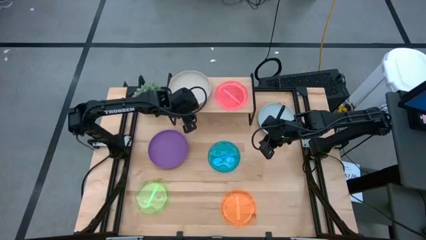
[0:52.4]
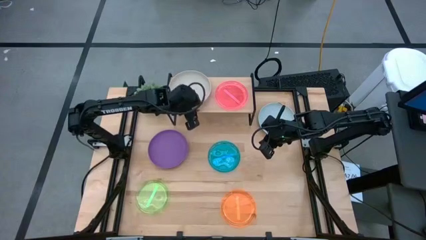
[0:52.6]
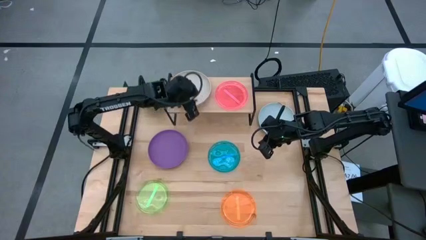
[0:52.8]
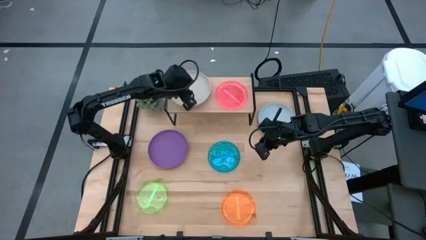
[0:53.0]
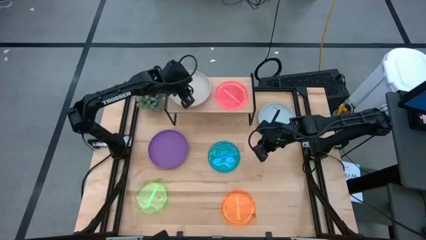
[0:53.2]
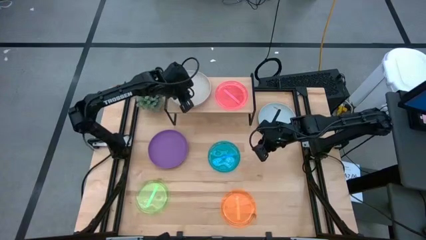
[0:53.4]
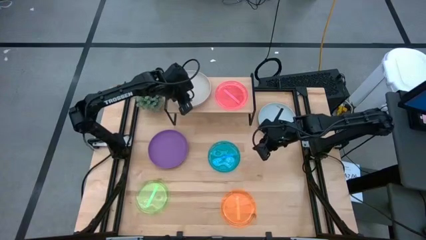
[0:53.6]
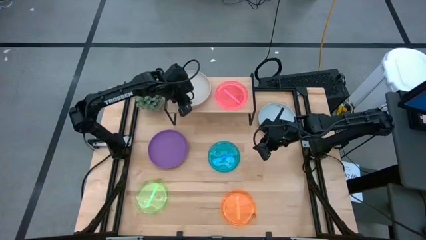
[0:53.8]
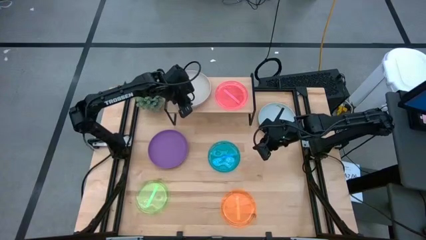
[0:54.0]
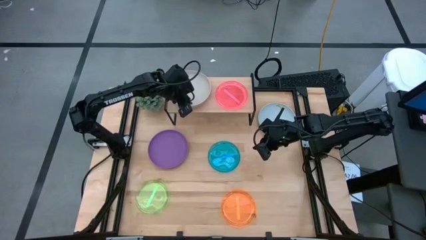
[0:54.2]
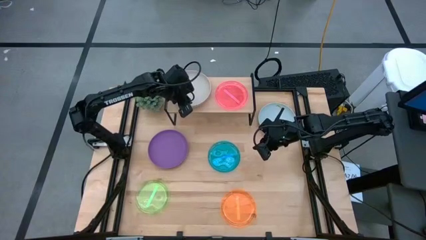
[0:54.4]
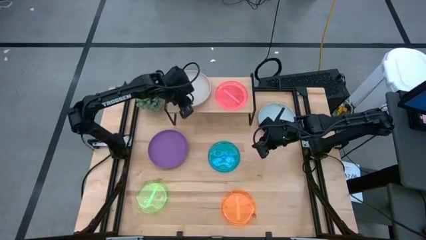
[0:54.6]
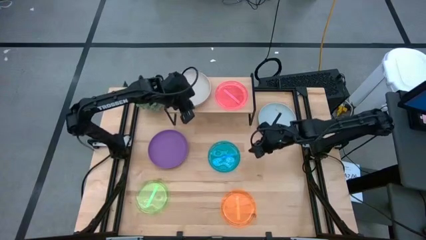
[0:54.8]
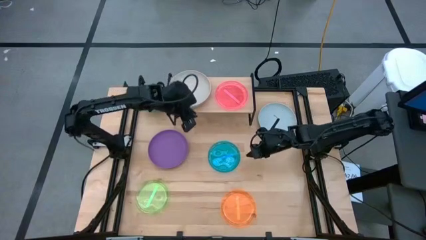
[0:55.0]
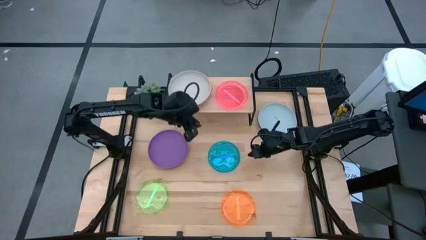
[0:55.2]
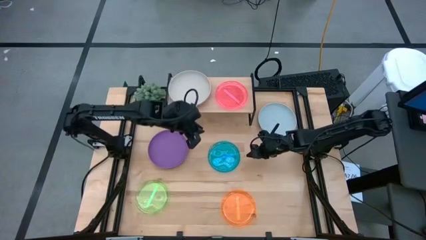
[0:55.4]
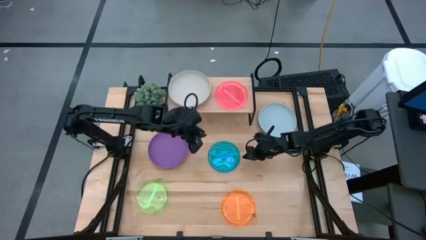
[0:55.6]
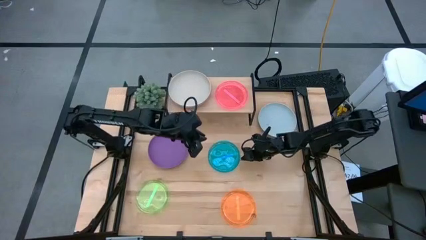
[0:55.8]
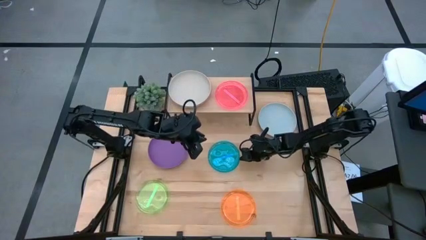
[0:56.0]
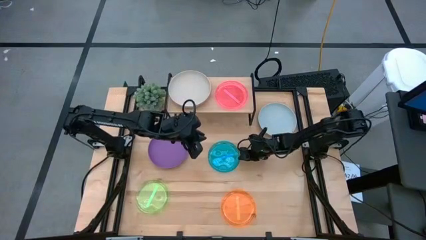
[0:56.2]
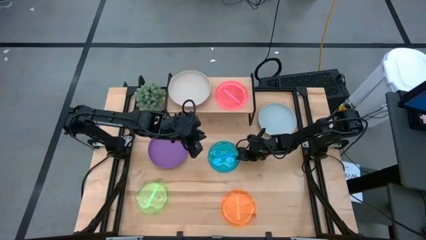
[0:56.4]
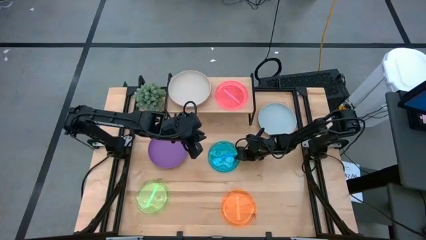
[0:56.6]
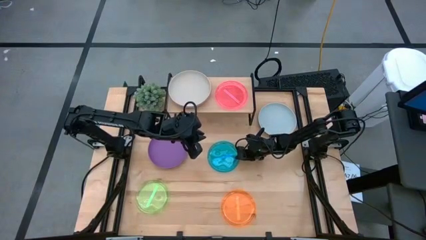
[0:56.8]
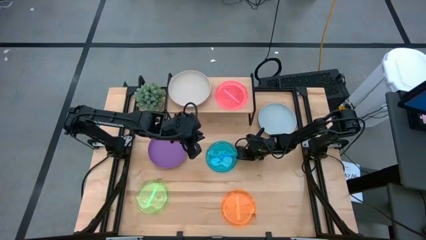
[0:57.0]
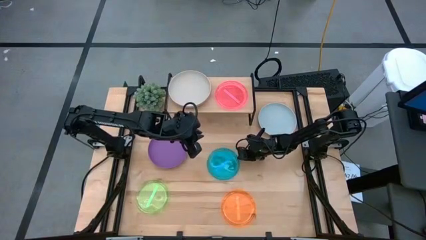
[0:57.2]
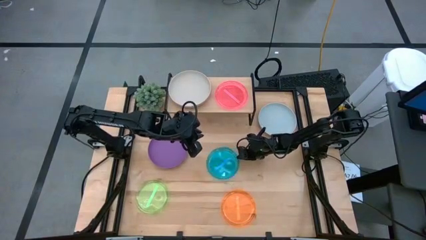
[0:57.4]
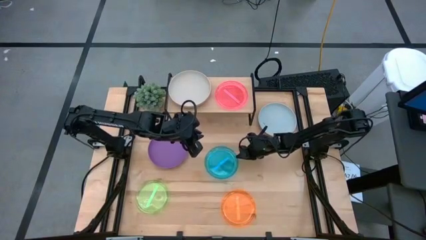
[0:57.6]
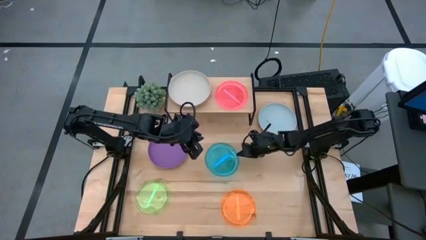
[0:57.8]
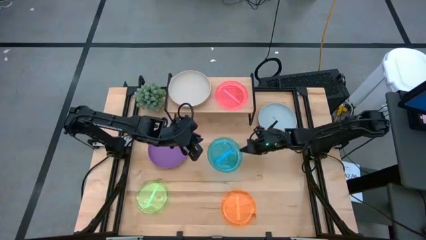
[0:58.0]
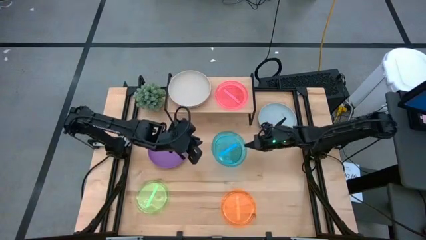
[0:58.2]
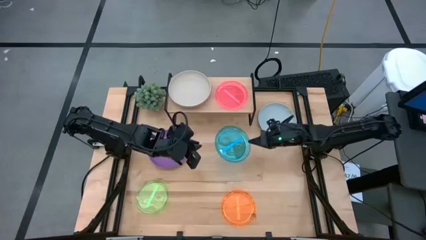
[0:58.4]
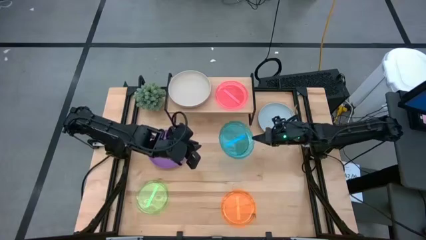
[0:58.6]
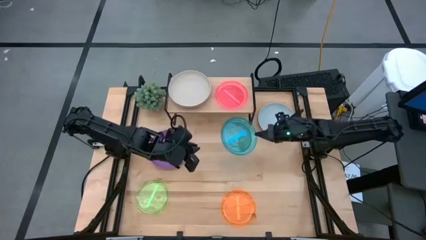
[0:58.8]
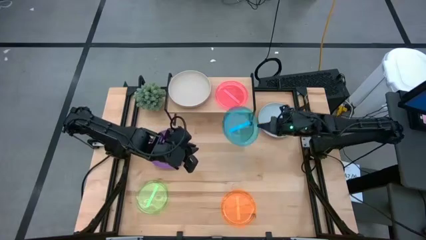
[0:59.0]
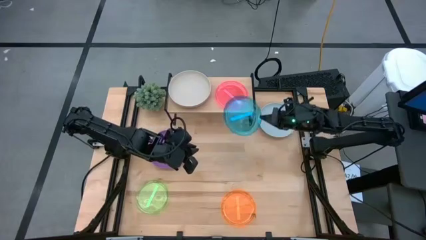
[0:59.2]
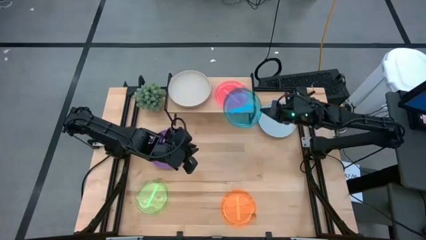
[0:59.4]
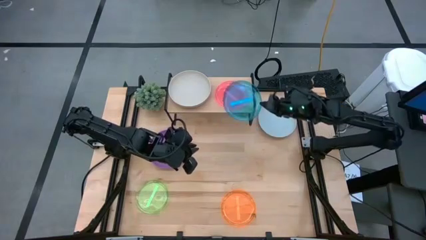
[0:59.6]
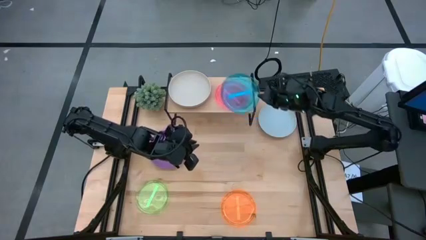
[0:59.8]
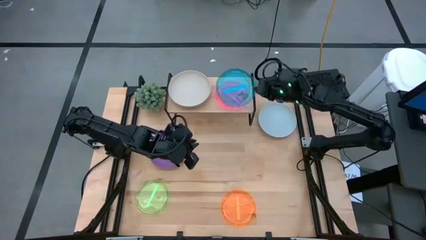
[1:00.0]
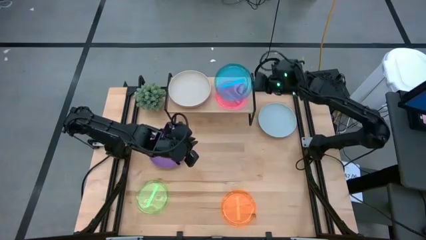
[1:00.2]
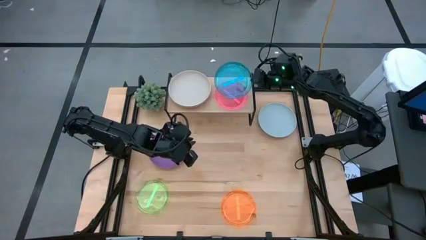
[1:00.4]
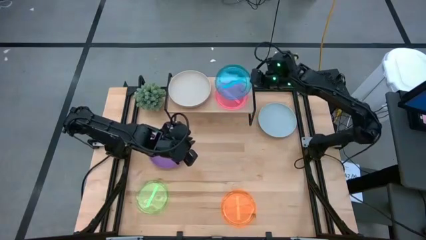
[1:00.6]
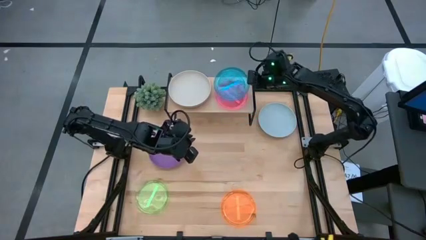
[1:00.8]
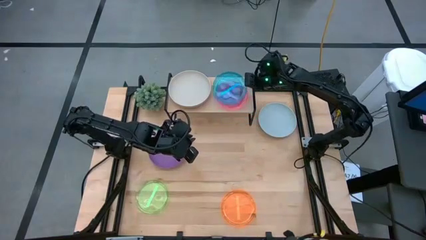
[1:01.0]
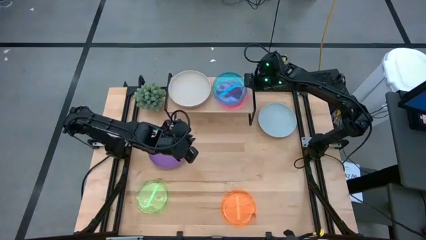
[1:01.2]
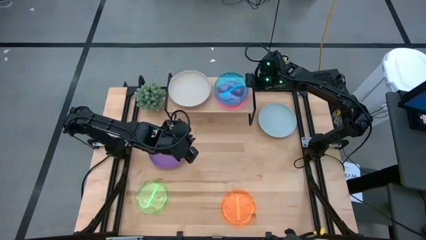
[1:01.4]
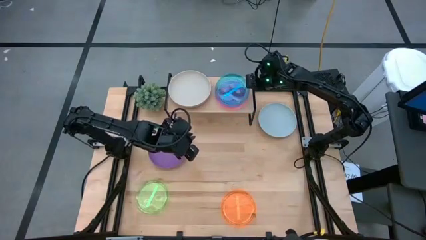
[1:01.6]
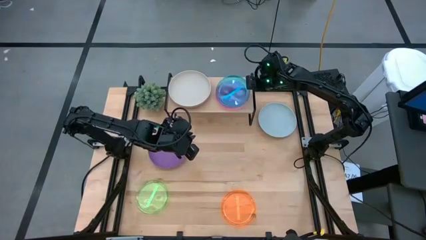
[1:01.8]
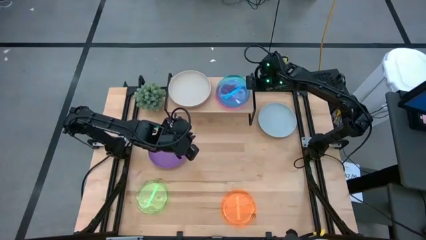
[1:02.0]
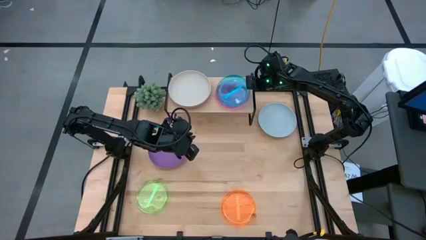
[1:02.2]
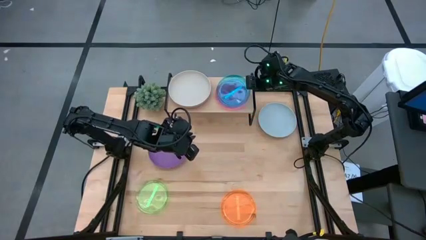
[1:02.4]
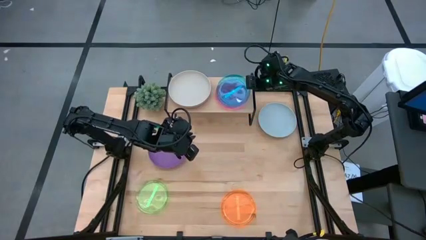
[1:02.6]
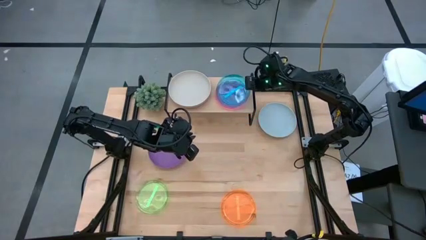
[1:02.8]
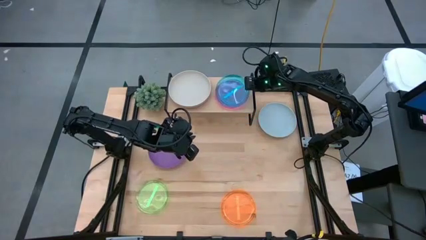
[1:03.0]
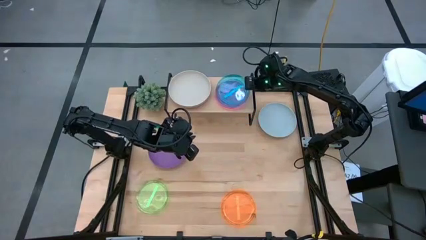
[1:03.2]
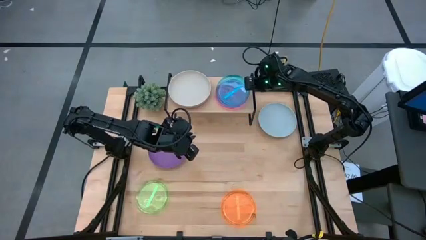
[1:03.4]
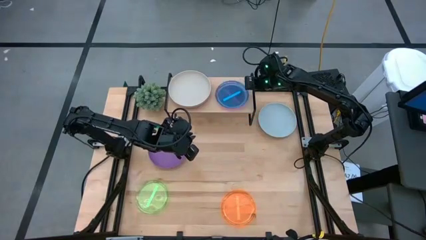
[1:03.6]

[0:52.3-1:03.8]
Task: Place and stack plates onto a shelf
Stack the small blue plate on top of the small pink plate on the shelf

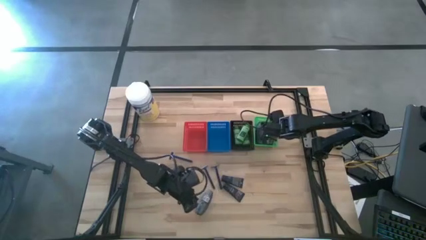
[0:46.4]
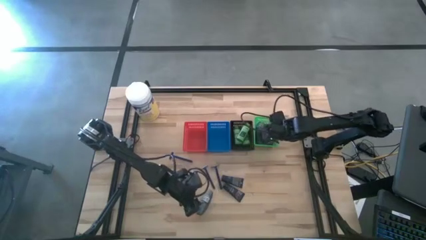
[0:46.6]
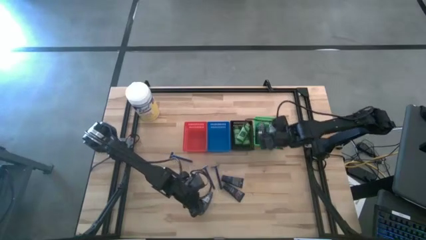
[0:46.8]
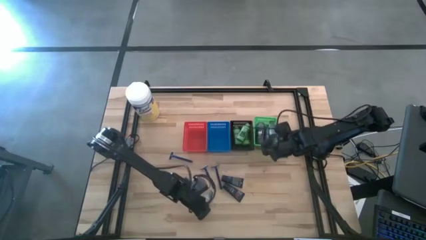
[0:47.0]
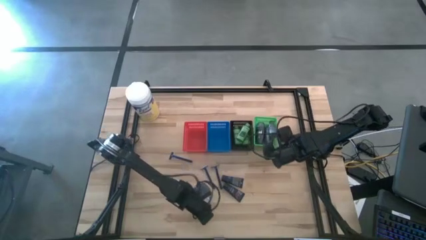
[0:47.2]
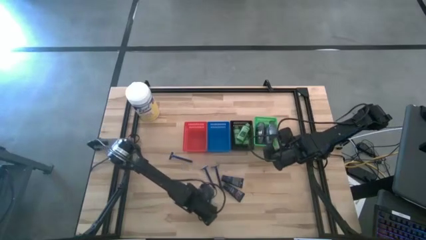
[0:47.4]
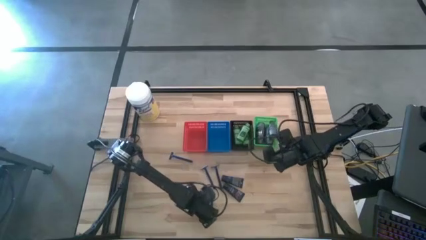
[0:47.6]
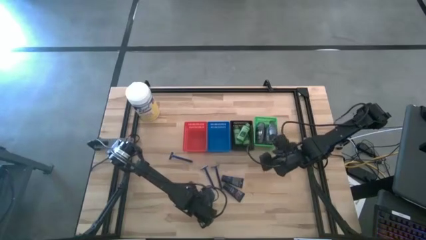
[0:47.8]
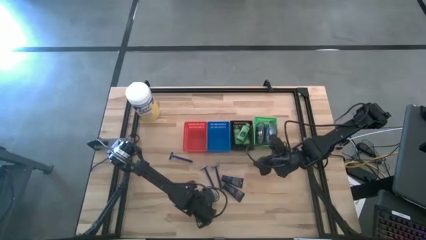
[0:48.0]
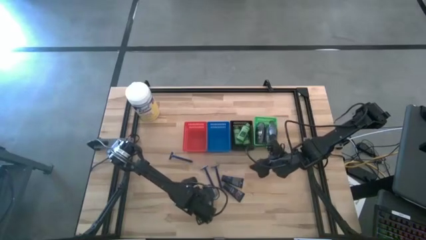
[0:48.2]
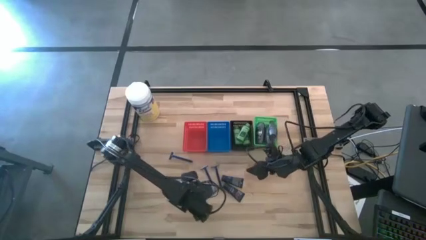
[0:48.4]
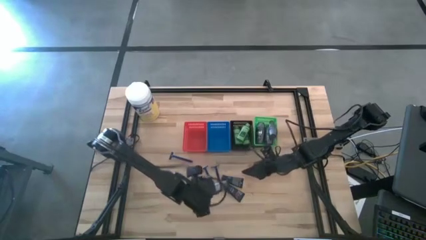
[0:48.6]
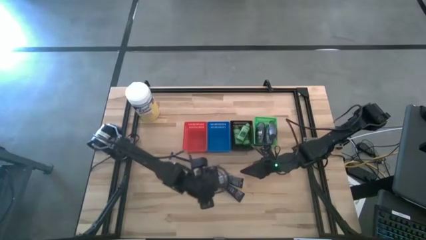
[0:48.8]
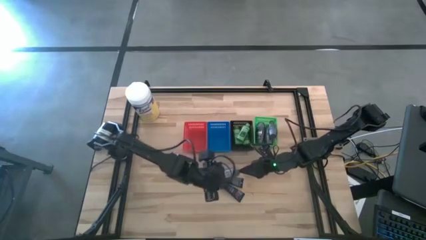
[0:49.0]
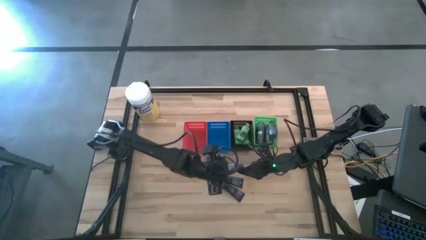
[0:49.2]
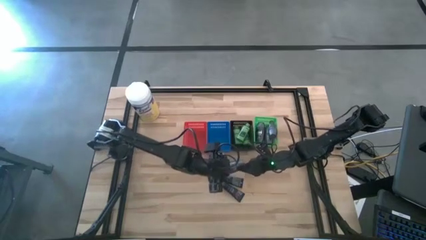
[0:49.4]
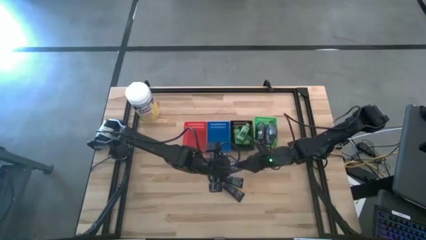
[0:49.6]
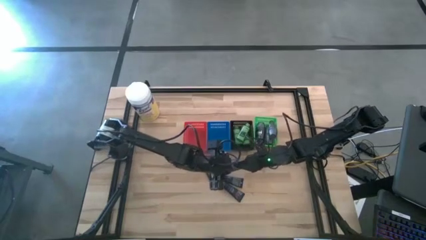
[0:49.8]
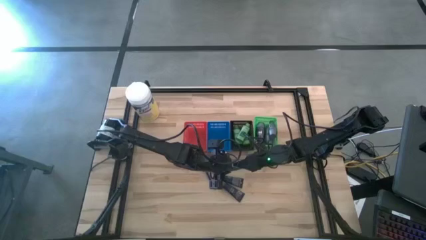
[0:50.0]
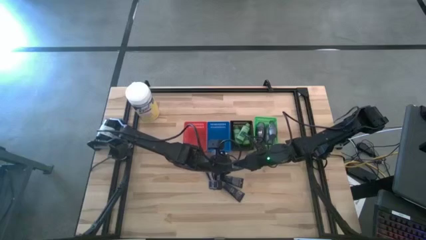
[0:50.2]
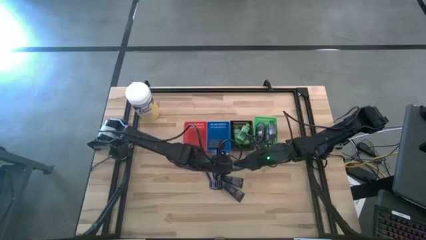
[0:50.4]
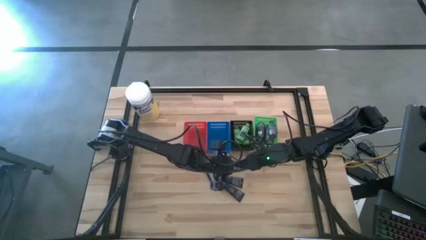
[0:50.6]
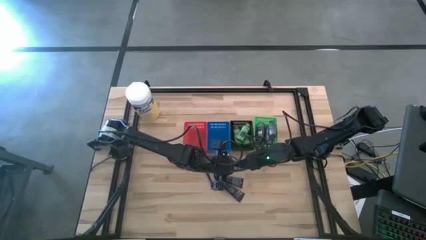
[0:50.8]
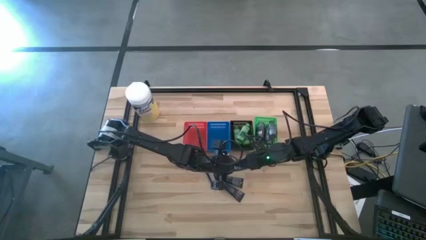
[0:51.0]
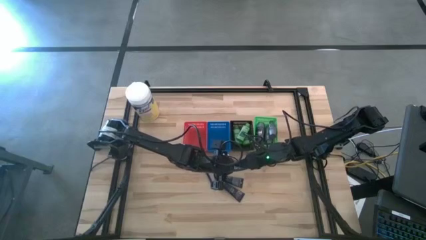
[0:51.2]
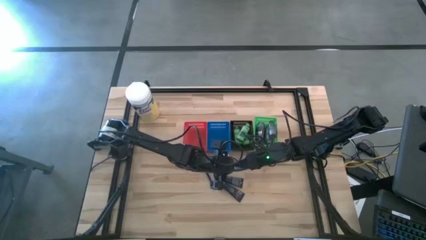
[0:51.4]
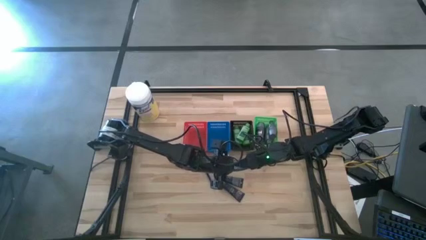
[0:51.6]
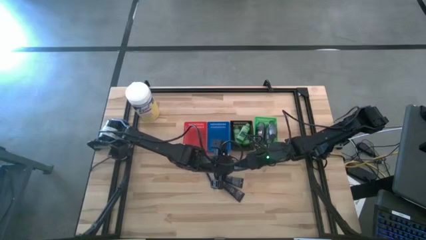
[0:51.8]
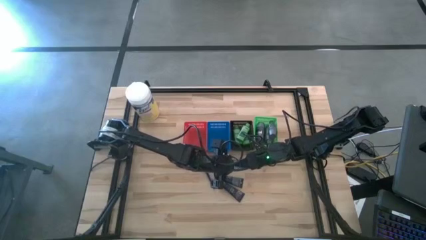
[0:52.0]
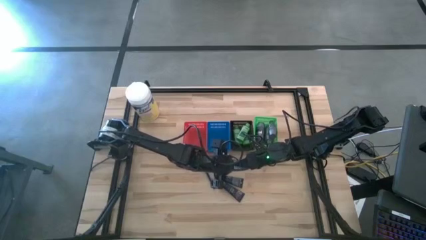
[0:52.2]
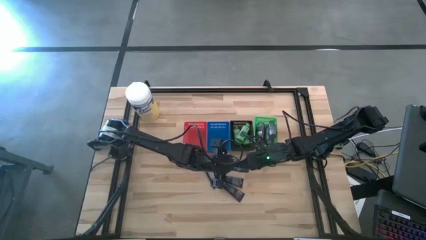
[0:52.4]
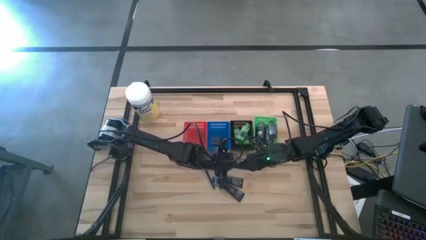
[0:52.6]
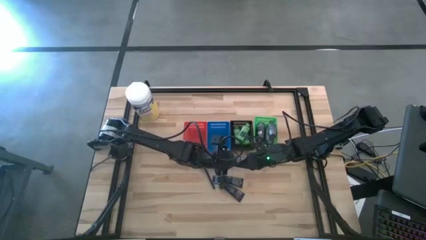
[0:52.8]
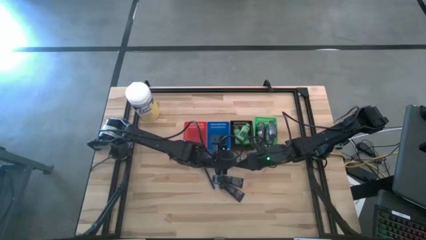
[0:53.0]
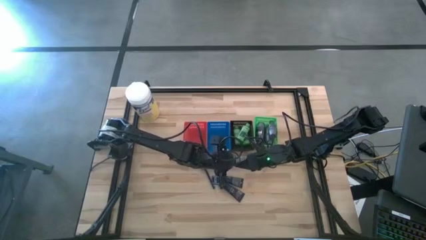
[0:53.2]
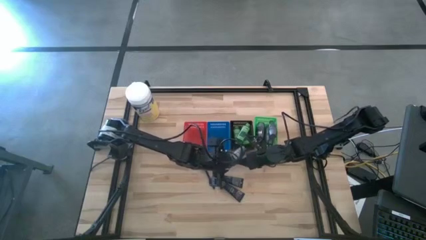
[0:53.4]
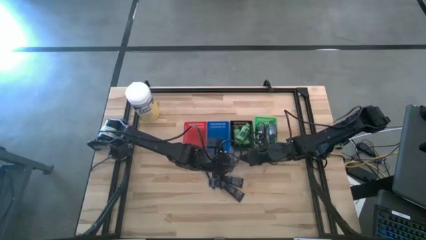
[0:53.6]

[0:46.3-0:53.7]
Task: Pick & Place Travel size toiletries
Put the deodorant into the green basket
